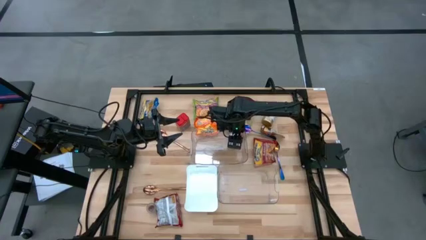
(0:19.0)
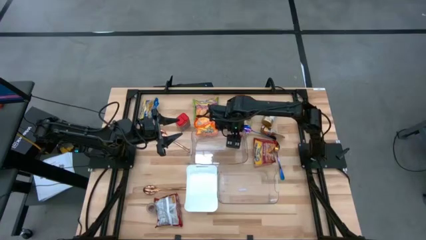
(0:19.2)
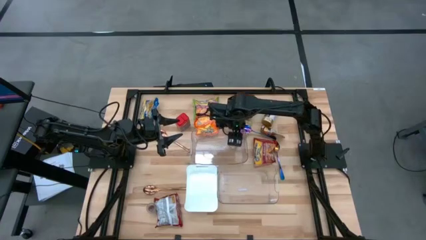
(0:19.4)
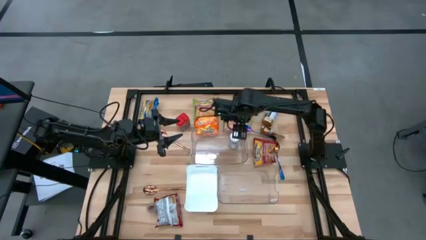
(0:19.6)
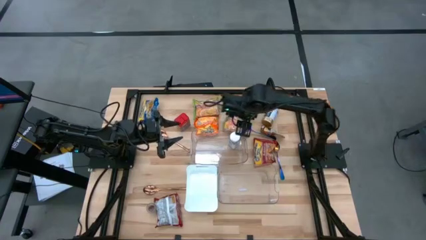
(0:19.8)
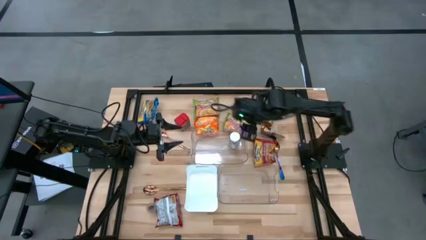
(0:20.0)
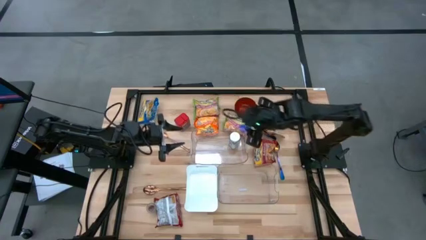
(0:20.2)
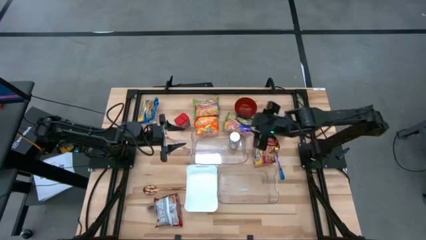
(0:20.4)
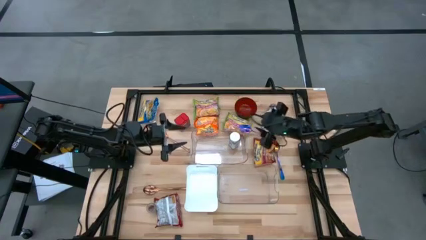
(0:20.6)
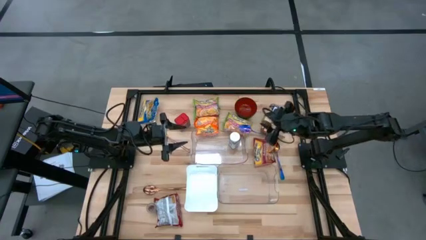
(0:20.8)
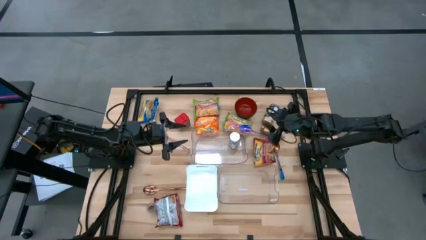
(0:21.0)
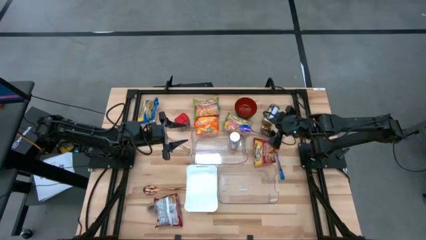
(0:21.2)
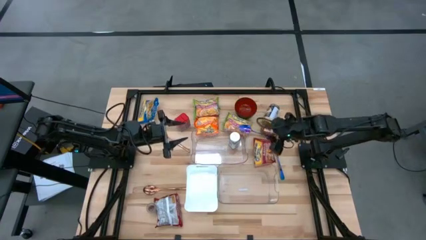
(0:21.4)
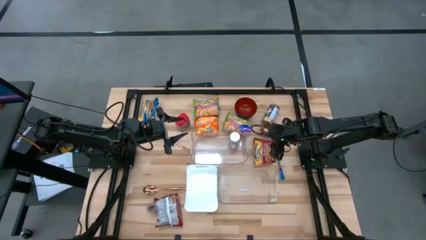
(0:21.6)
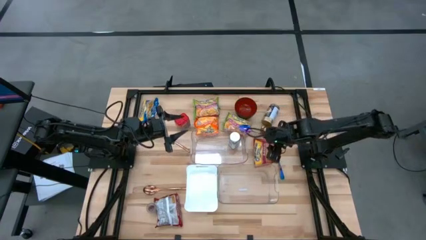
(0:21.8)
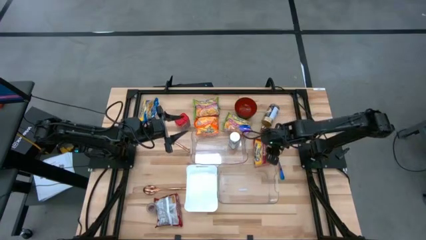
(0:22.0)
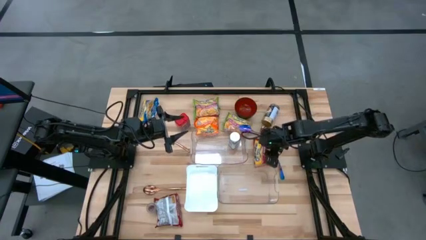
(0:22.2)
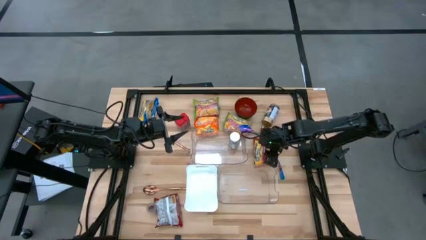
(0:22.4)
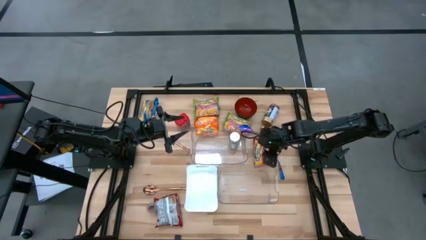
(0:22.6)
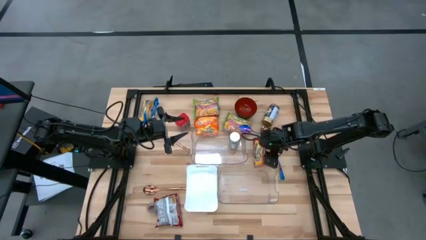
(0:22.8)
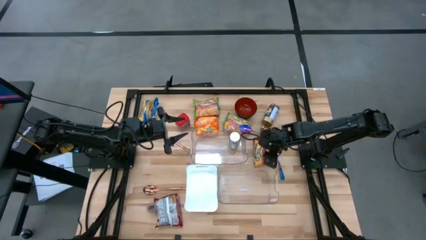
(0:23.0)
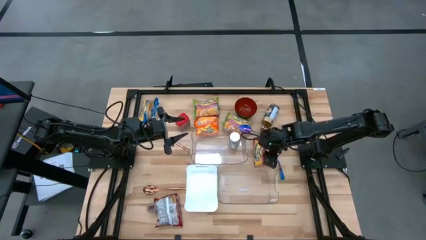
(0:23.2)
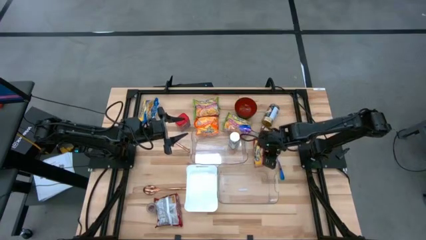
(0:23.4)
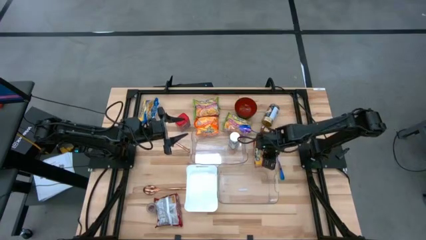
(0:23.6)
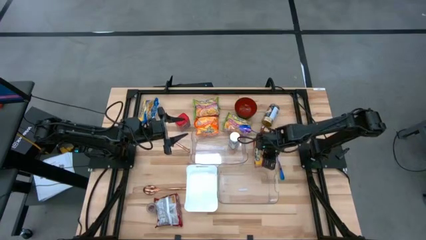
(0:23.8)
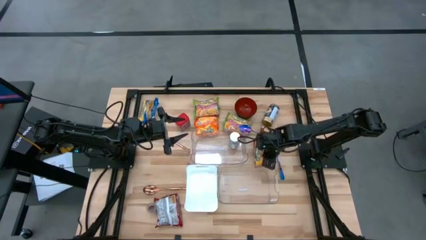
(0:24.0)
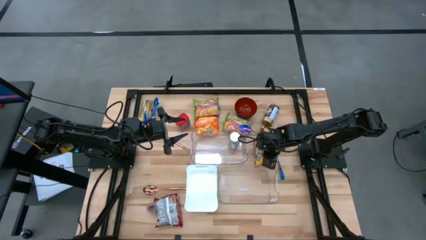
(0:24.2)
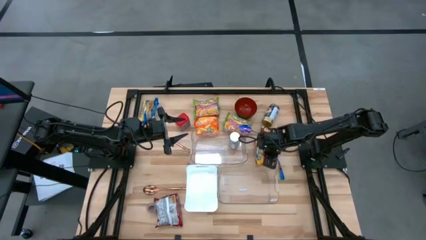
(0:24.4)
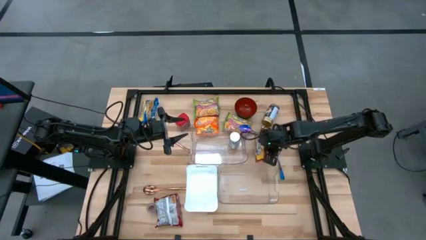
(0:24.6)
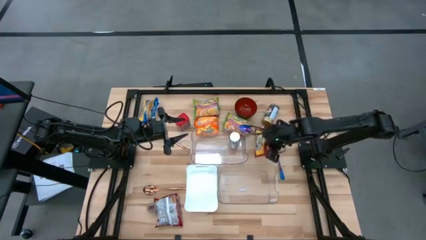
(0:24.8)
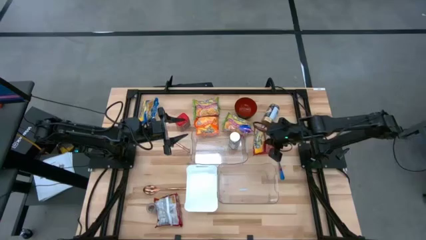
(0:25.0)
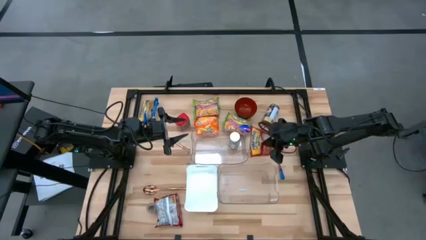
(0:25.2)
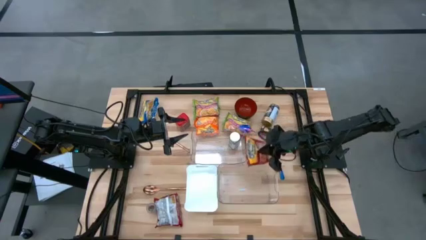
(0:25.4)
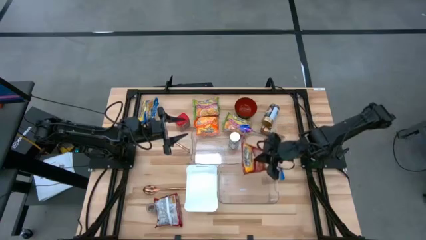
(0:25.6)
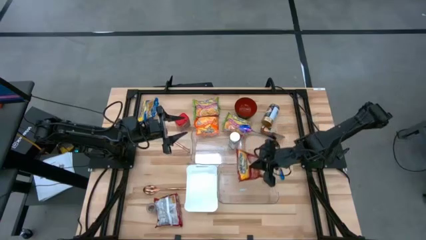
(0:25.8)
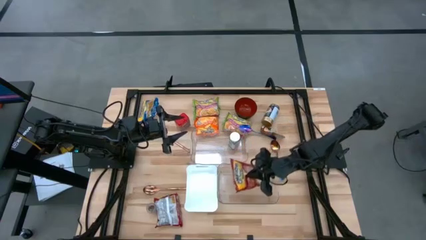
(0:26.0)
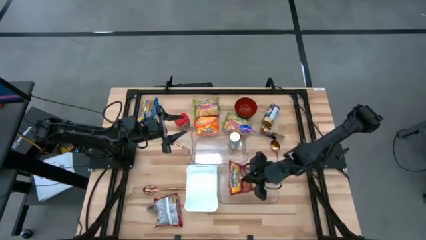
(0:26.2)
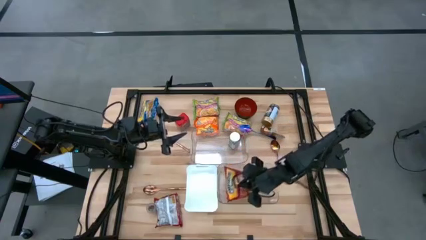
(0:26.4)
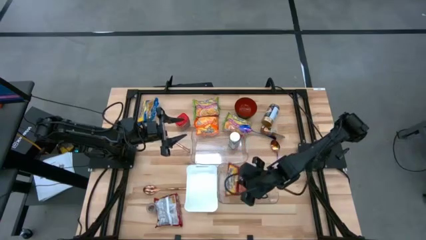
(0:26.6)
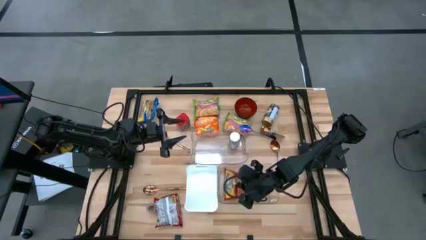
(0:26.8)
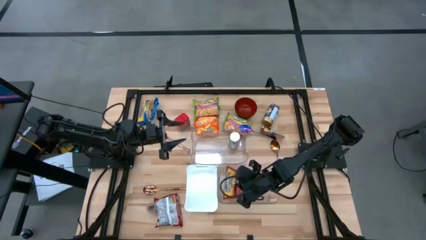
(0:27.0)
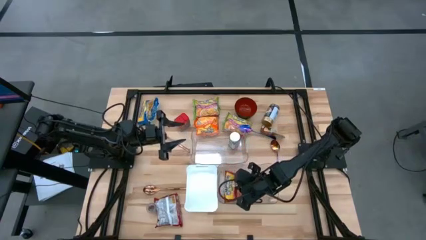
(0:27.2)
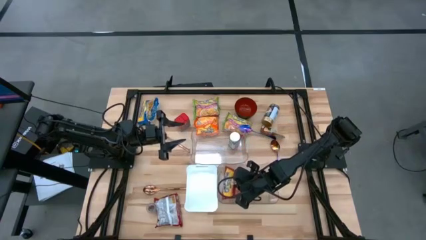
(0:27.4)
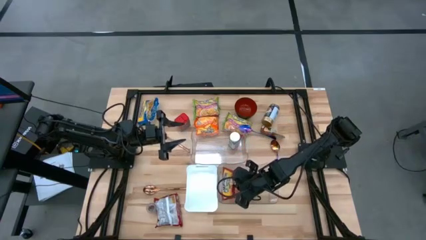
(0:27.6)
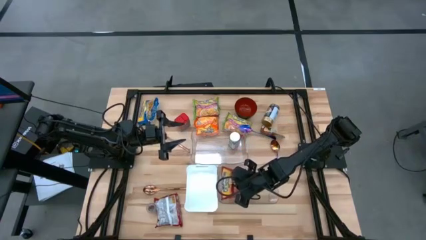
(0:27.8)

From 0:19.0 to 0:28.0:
Task: Pick & Place Food Item
Put the right red noodle pack into the bottom transparent bin

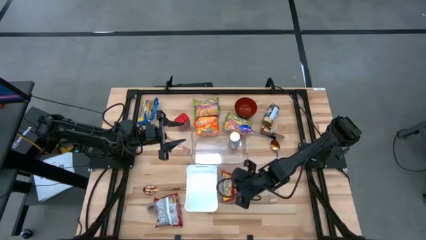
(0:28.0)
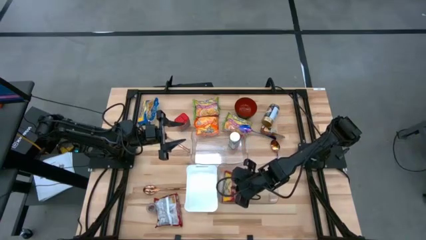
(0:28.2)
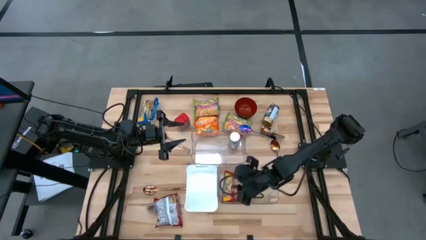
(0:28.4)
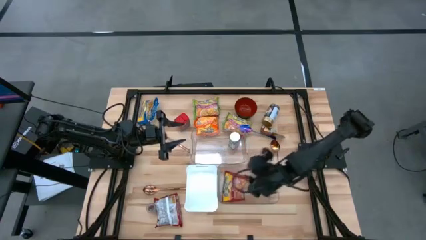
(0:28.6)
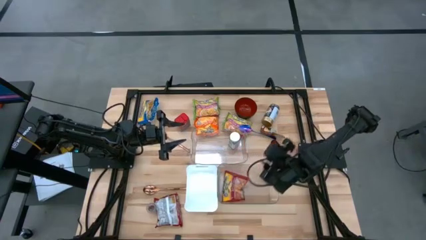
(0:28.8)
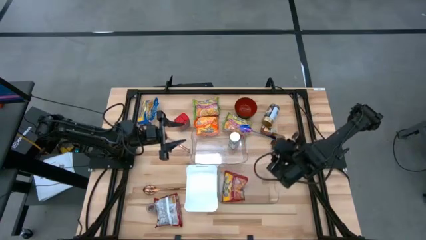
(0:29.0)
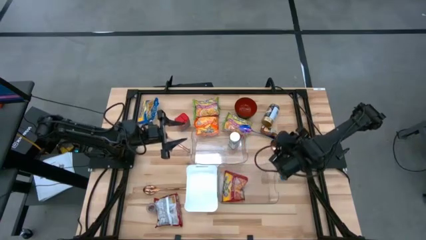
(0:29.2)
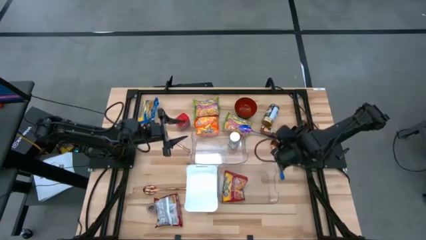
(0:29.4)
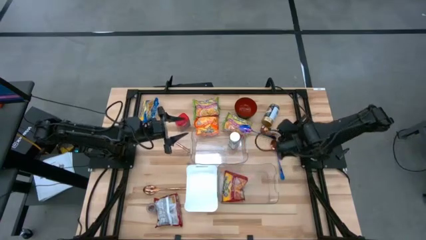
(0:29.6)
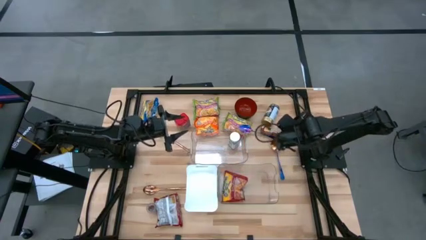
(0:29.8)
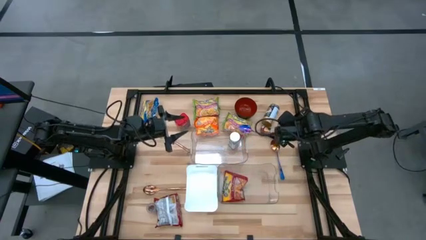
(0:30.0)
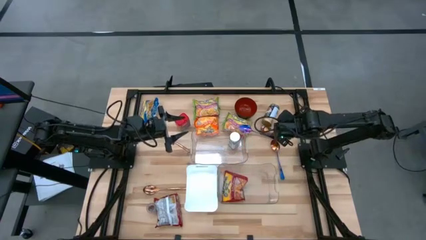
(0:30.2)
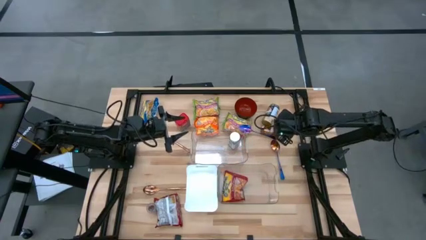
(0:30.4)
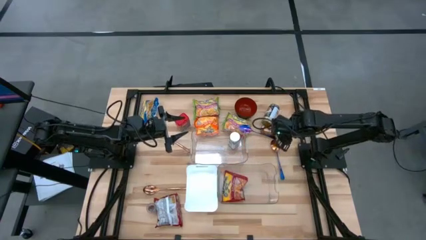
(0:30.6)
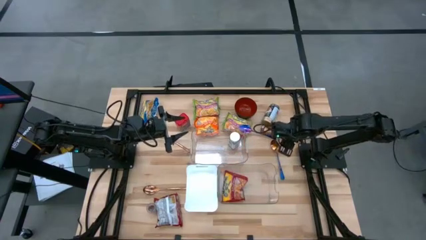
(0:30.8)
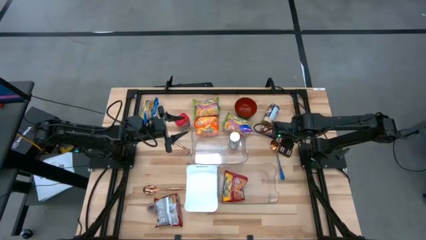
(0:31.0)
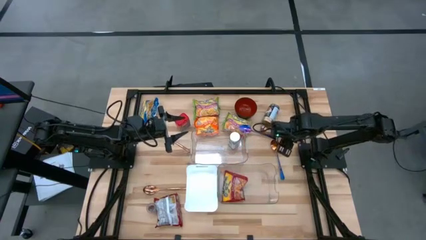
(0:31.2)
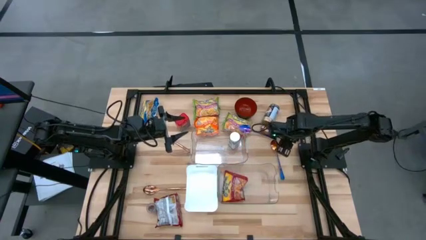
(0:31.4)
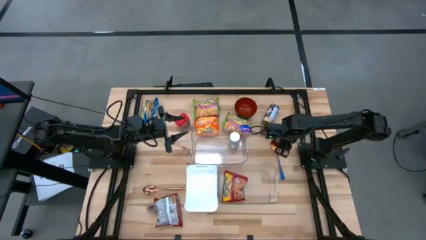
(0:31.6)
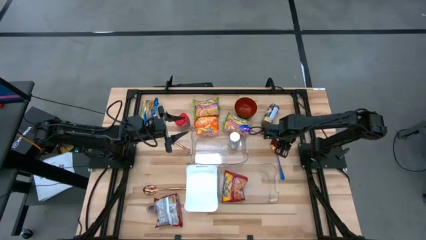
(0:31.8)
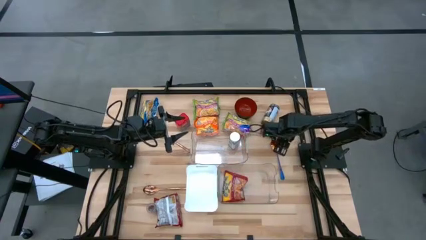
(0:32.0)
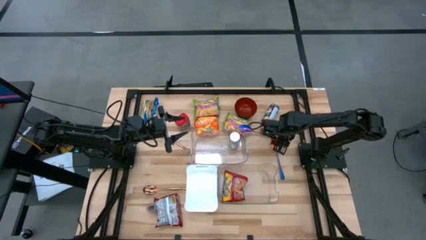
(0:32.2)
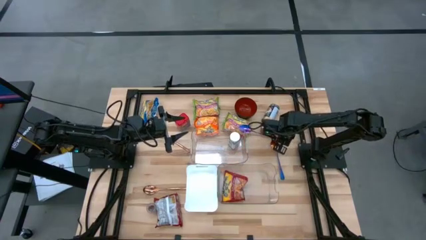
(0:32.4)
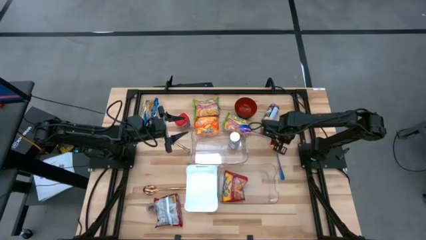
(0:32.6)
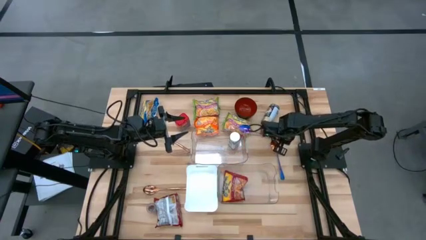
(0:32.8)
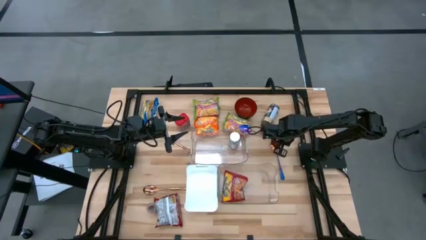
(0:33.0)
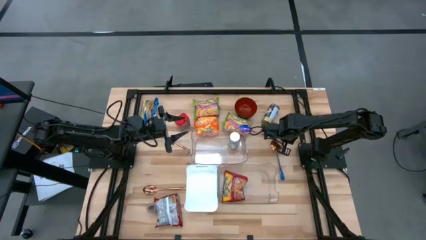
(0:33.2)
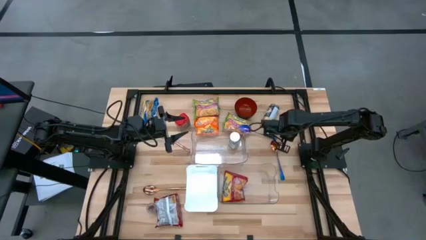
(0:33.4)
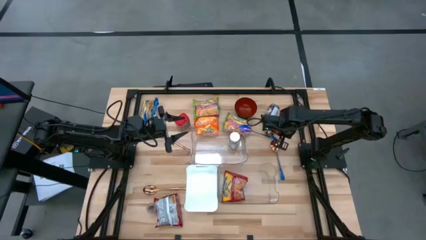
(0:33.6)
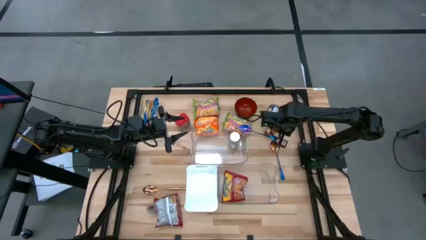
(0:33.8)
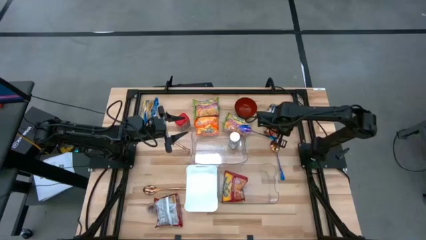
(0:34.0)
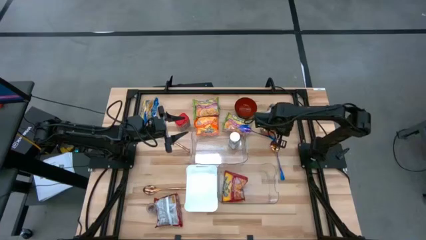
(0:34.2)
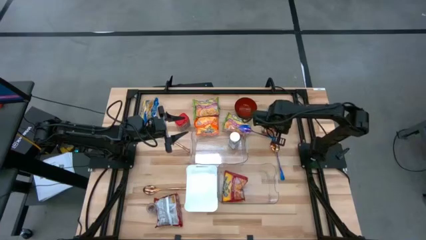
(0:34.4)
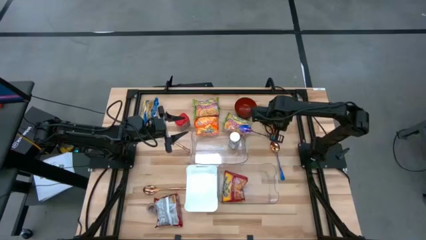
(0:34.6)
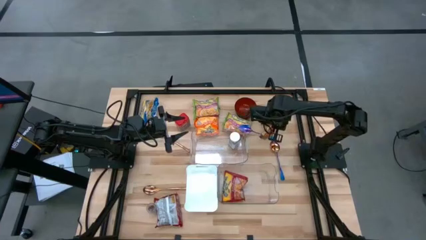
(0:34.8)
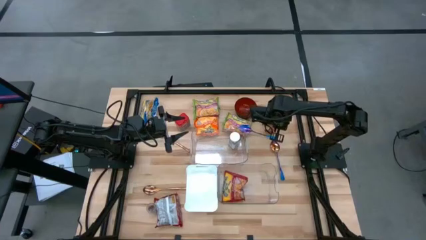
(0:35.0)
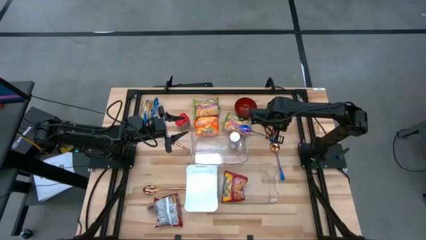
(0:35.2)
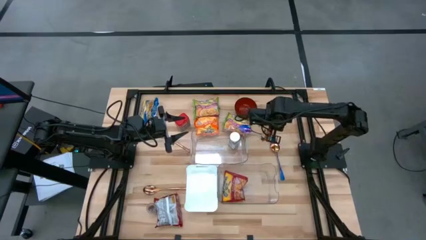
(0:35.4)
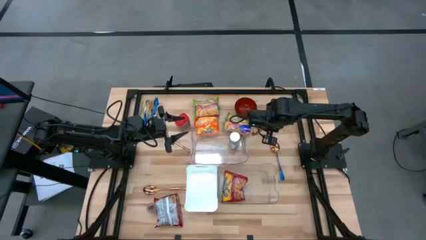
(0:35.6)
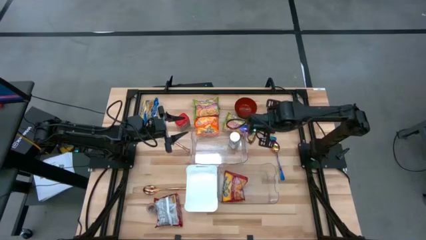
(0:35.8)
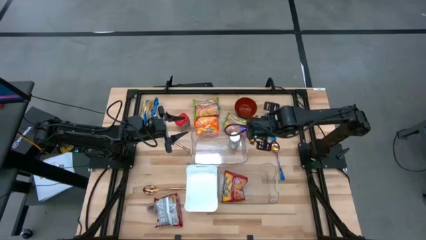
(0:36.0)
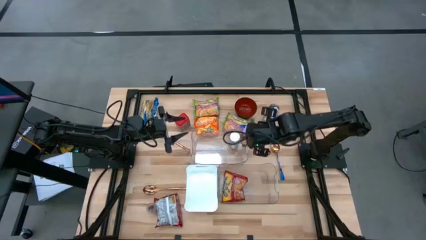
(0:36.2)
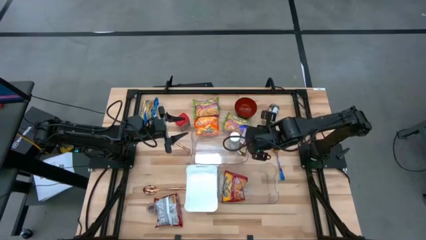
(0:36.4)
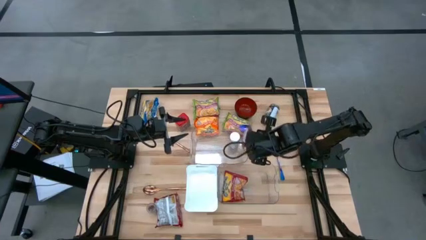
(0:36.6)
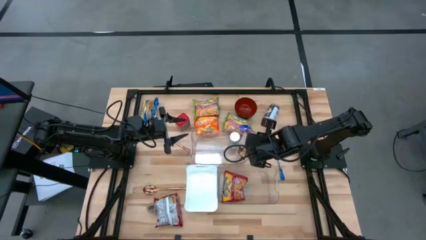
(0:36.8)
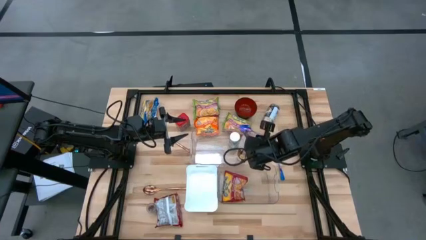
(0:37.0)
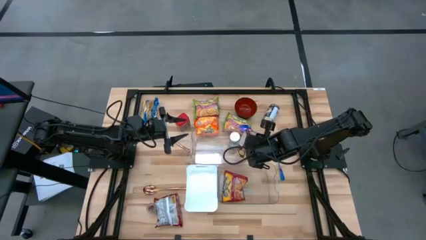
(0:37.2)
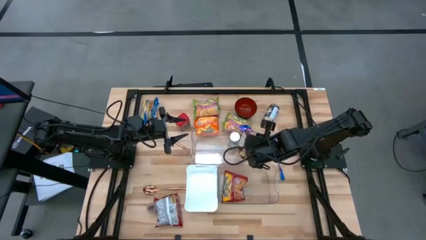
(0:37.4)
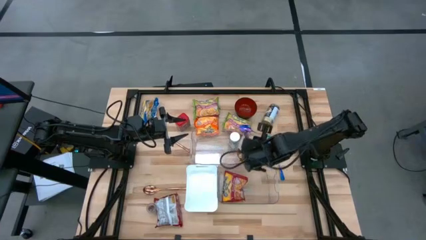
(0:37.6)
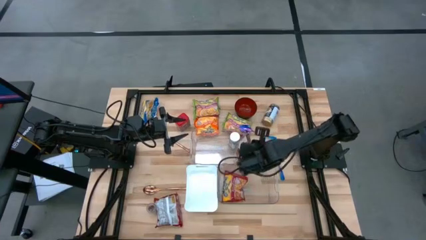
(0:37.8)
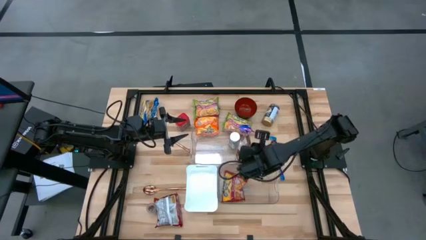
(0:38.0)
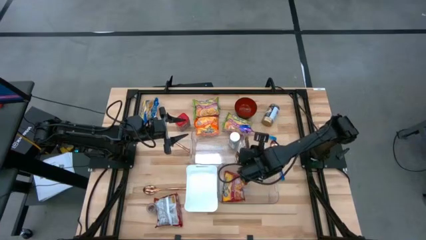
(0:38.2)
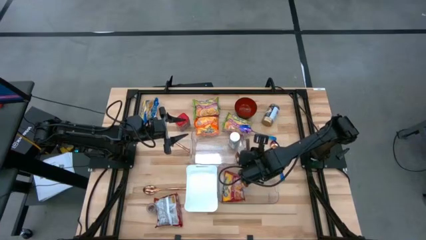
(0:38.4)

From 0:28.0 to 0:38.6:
Put the orange spice pack into the top transparent bin
